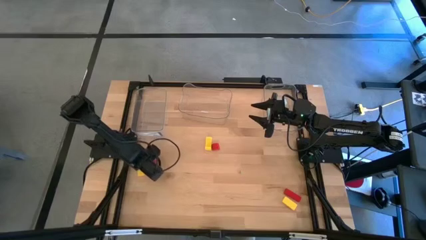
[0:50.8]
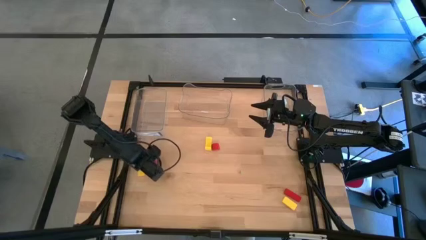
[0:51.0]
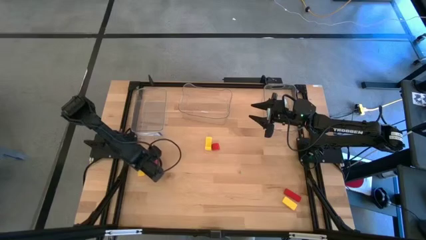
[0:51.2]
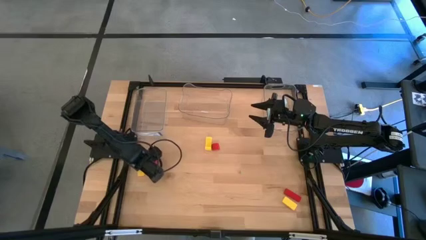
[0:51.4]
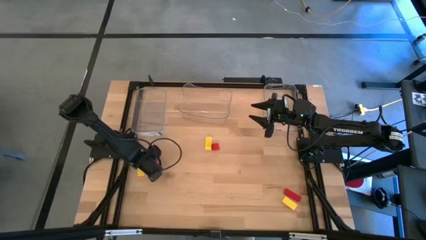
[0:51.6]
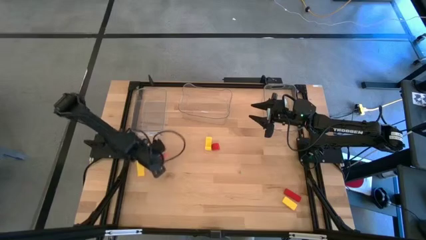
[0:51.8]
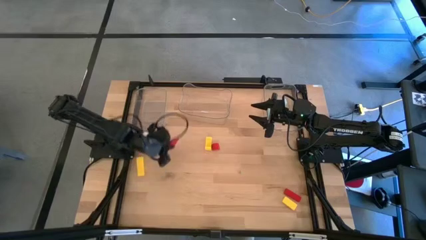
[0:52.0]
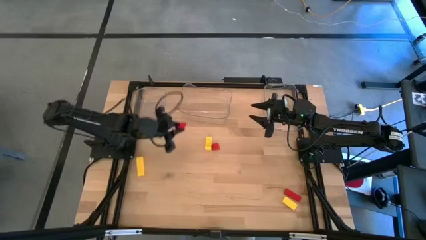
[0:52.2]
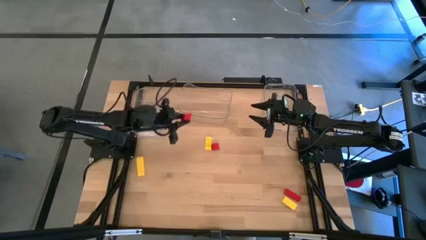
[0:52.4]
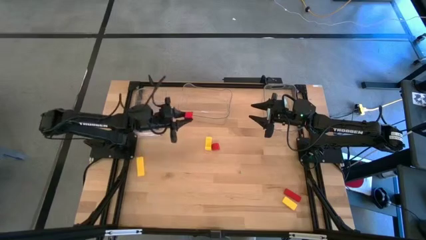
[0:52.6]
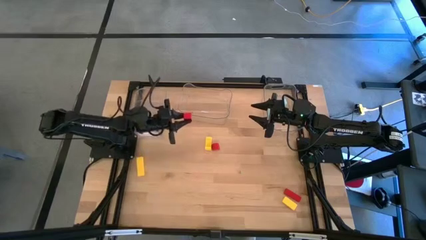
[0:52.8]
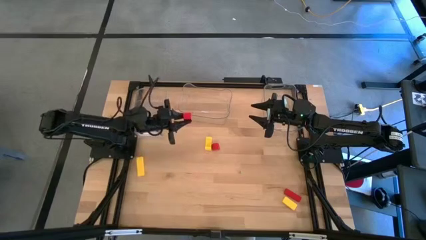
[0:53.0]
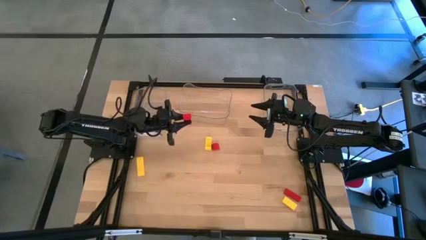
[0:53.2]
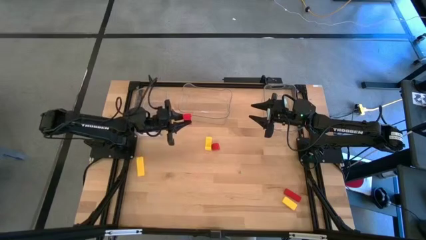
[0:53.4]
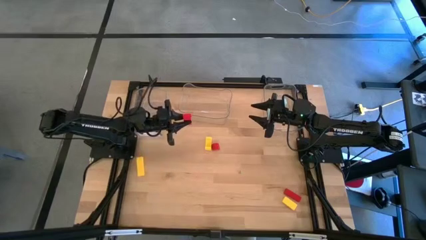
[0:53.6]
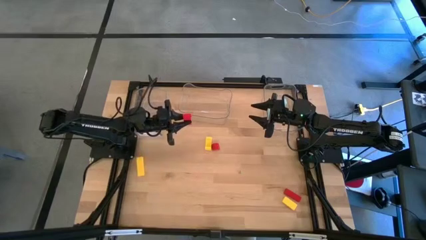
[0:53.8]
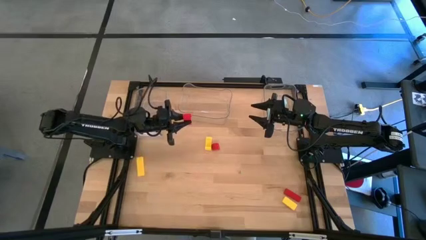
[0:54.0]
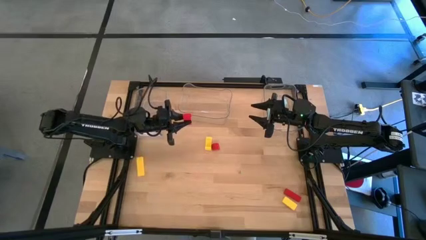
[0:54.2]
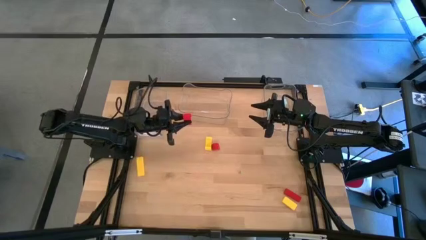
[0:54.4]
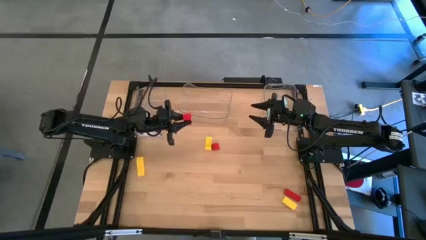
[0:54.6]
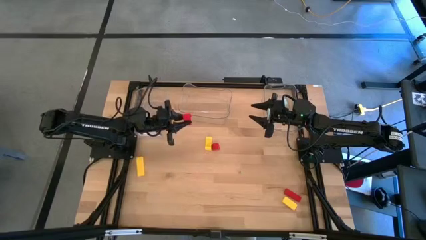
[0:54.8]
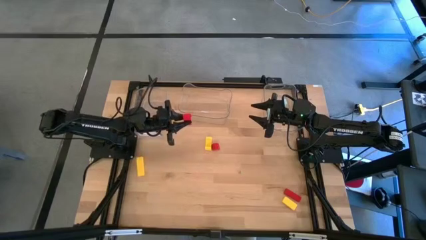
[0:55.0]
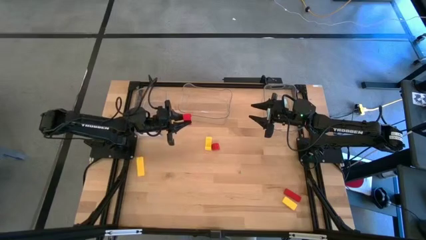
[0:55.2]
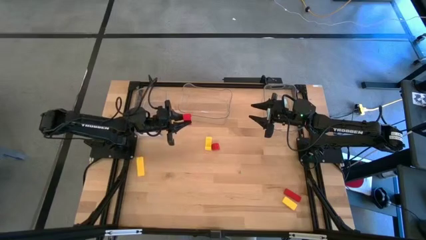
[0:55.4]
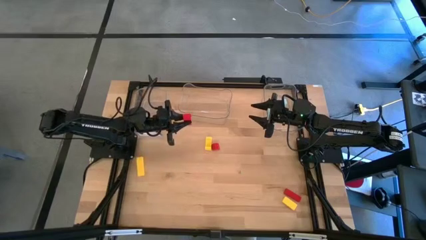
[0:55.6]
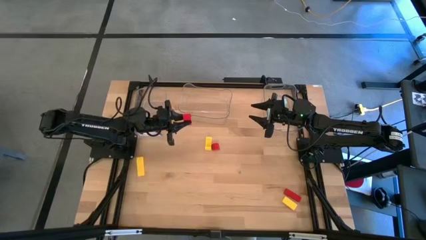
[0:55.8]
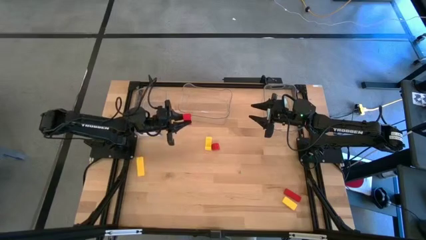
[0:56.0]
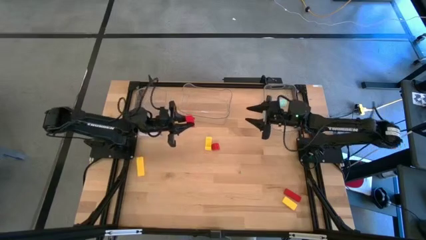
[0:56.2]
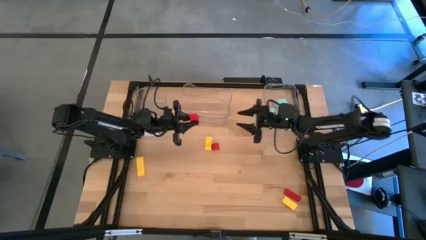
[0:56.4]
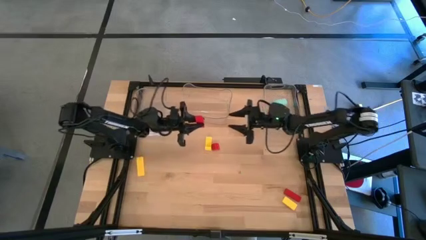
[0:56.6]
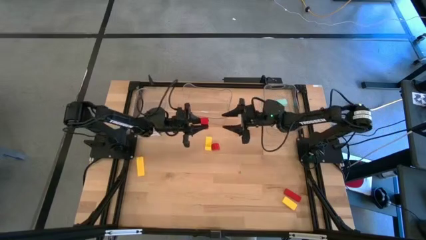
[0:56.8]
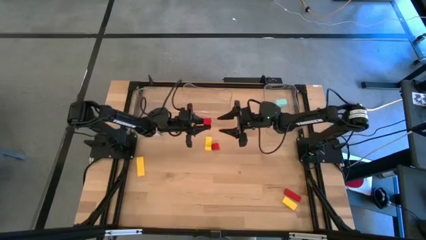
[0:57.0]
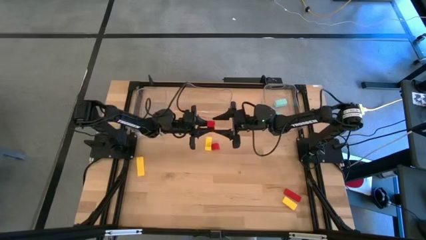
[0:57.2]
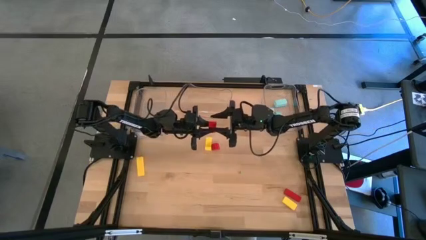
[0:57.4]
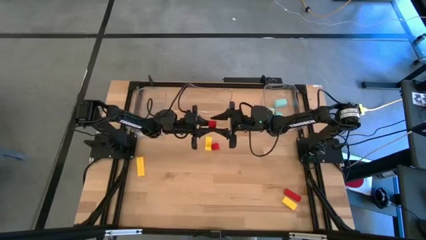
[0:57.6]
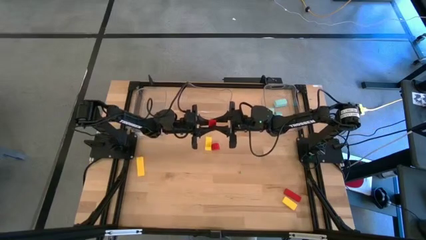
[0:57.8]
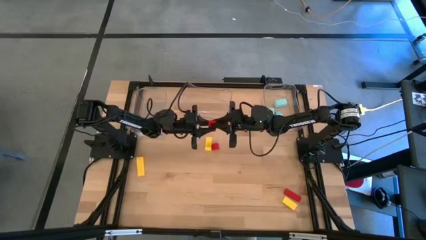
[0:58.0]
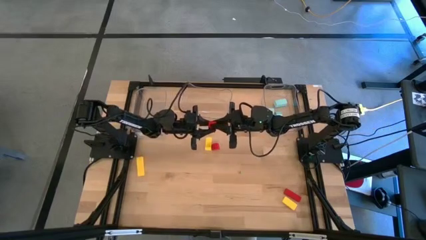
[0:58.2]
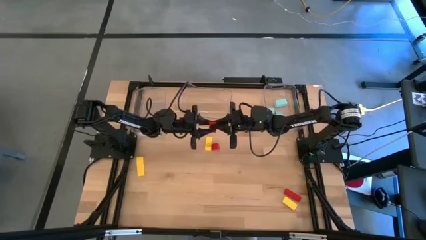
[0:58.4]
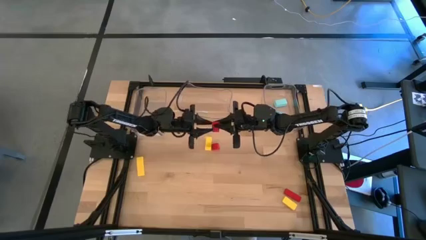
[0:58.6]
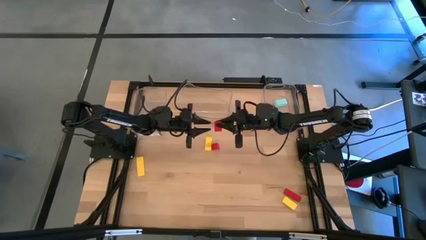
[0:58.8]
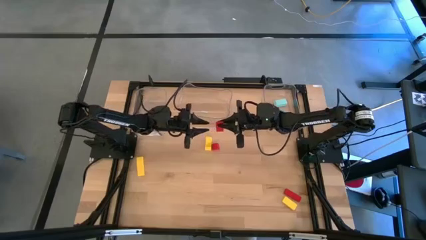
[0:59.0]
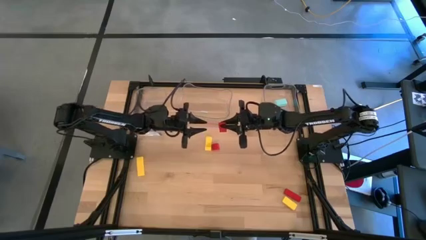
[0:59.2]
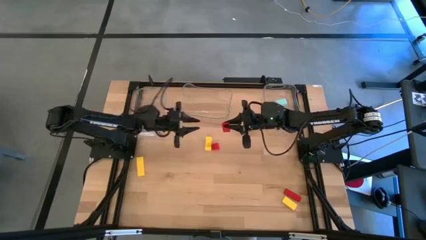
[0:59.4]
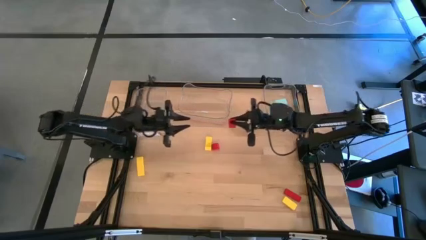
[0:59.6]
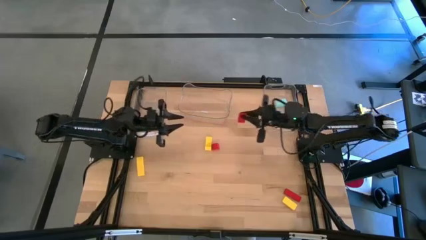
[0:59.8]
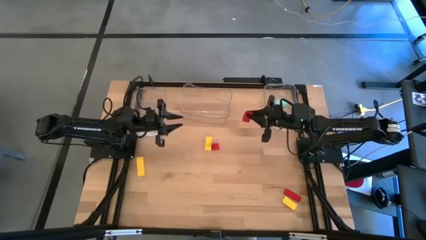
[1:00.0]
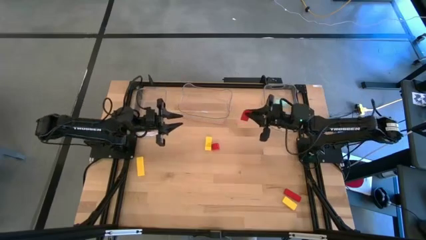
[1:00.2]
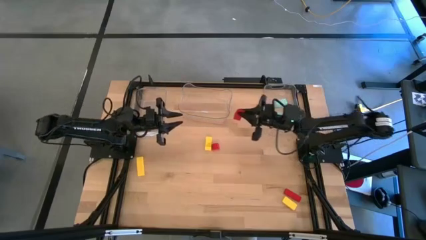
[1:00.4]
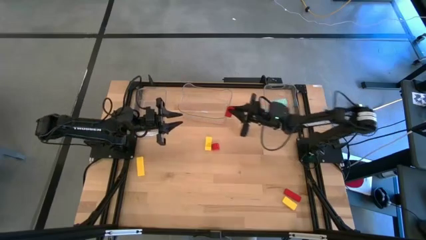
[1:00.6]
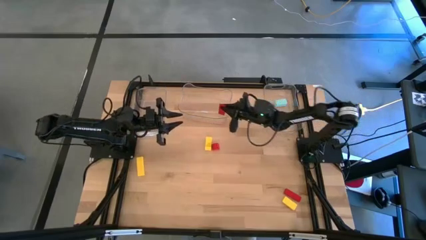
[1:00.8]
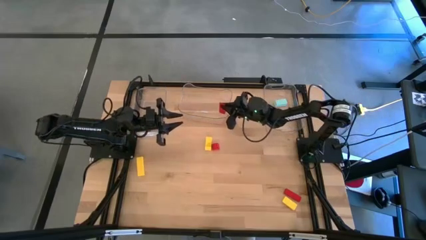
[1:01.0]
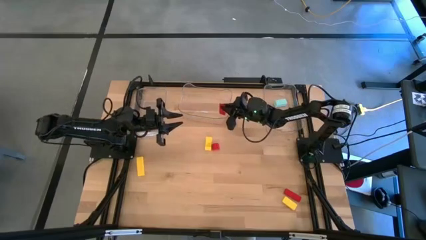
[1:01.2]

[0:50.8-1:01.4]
Task: Sort & place blocks by color
Put the left red block into the middle transparent bin

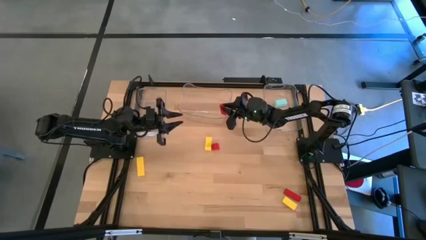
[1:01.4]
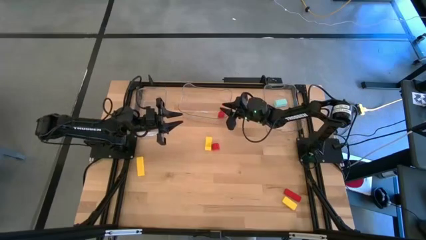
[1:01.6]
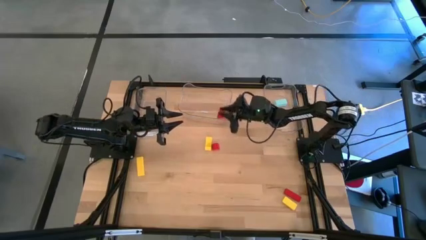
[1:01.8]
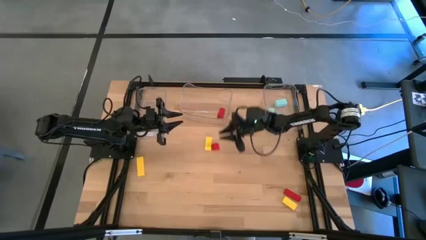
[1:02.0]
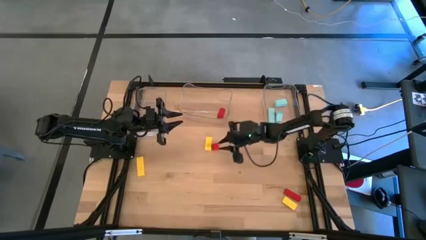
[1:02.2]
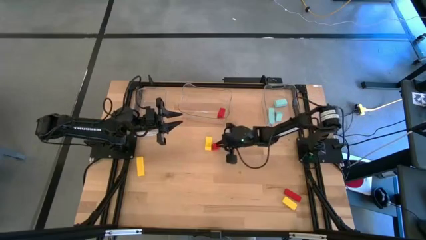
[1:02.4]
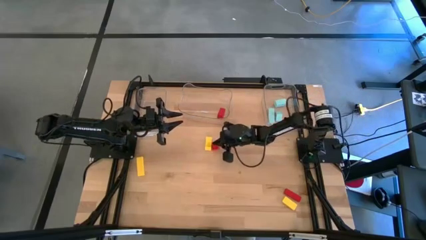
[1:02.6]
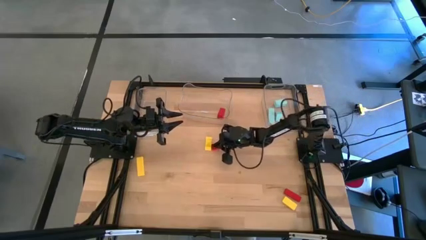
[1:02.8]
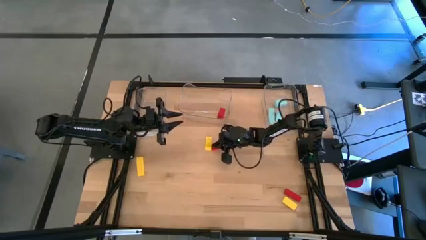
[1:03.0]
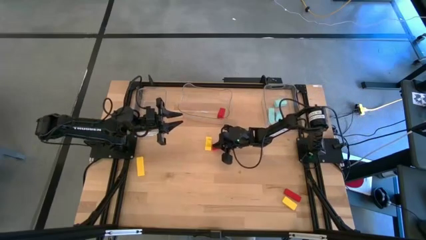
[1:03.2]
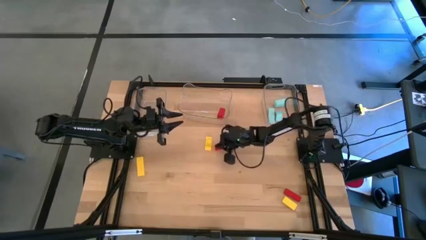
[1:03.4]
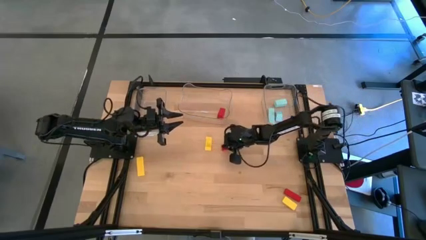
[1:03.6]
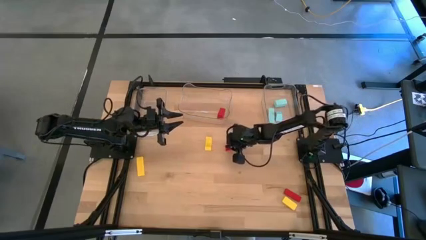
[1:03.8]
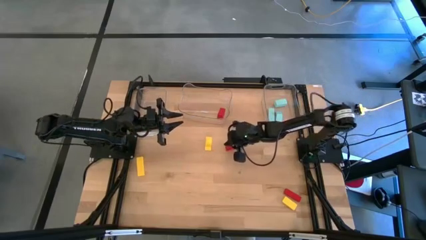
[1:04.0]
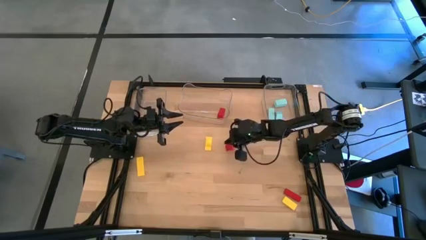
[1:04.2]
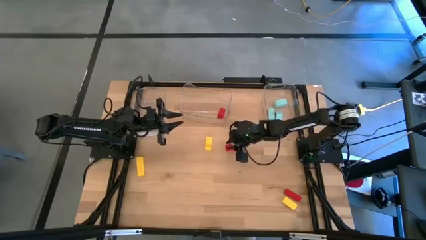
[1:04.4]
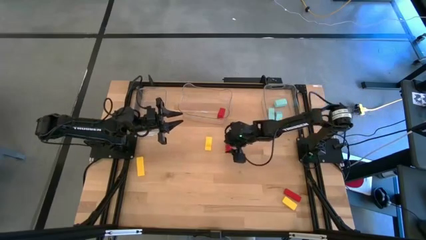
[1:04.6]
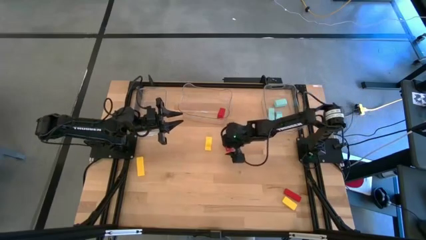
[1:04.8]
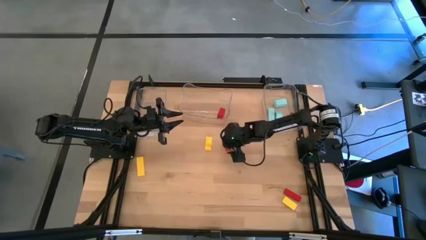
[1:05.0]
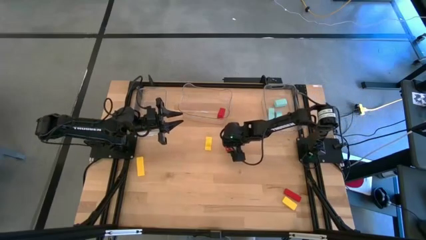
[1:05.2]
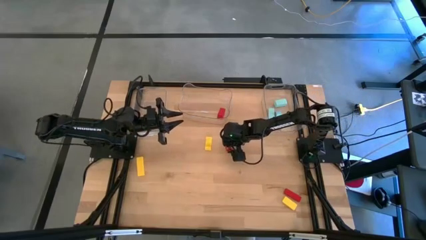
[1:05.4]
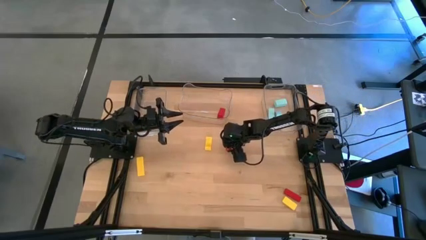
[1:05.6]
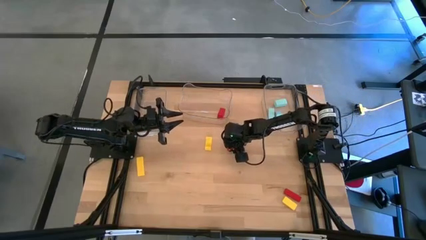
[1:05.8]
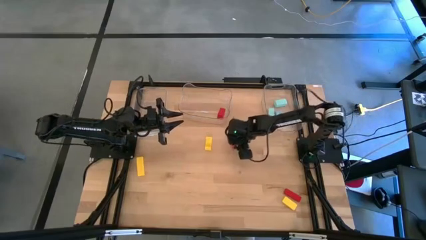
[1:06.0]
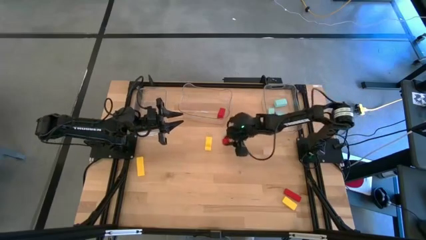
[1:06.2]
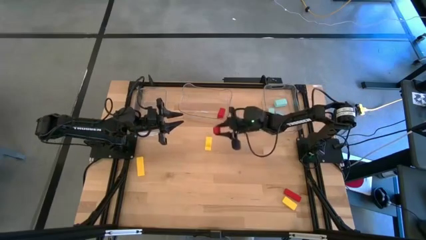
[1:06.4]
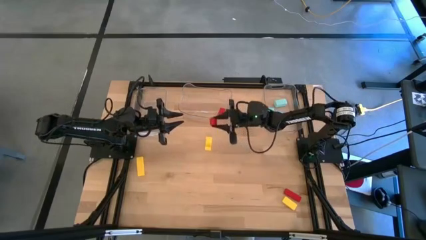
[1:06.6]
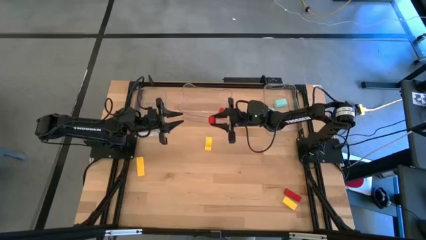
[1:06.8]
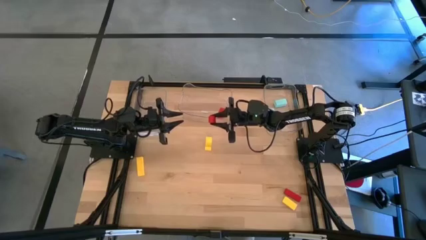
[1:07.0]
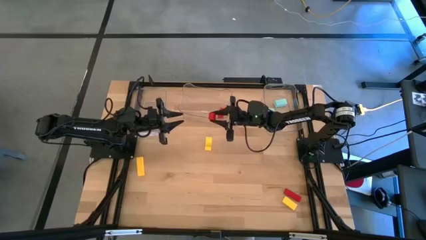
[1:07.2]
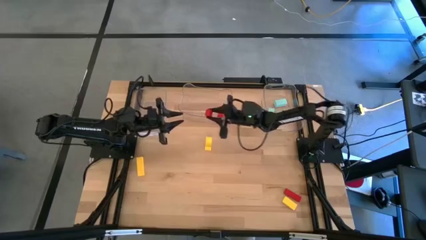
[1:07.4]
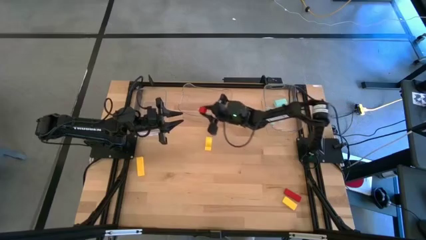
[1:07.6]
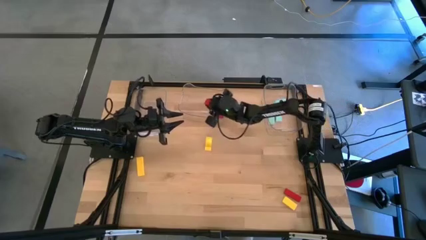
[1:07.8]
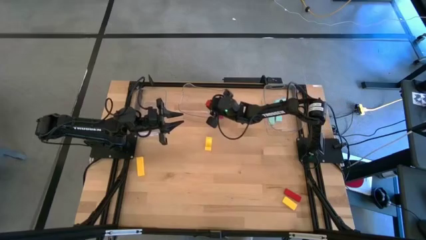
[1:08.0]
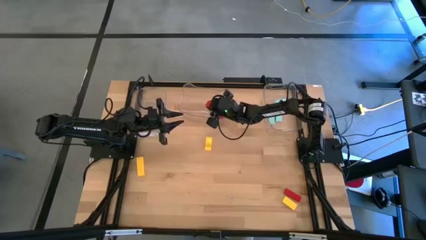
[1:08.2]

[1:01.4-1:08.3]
Put the top red block into the middle transparent bin
